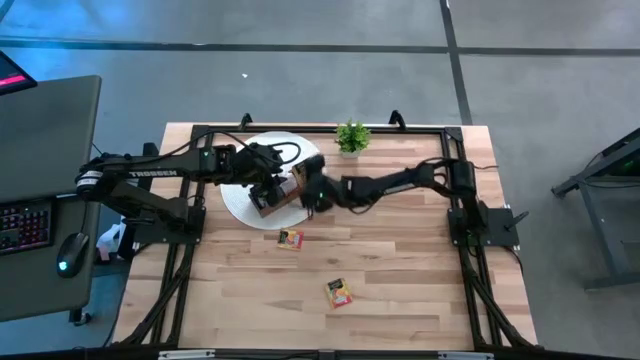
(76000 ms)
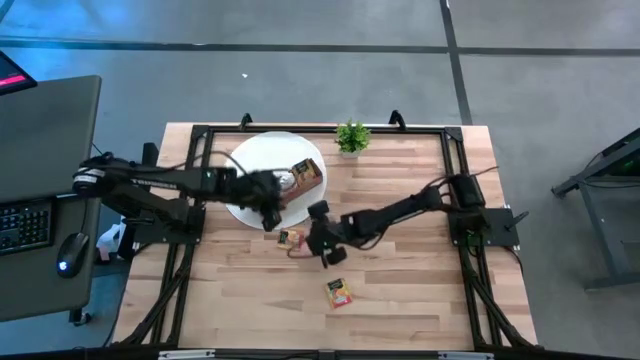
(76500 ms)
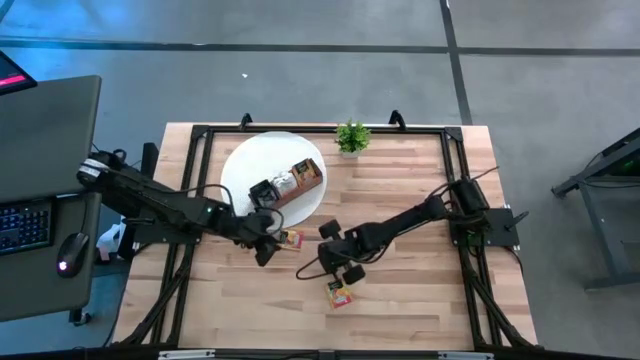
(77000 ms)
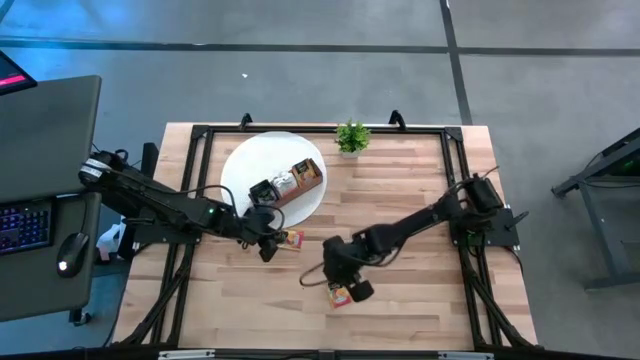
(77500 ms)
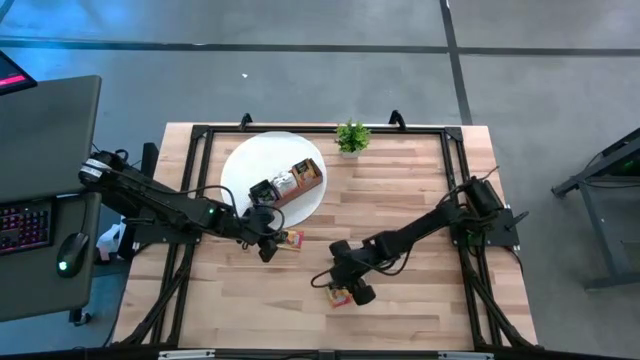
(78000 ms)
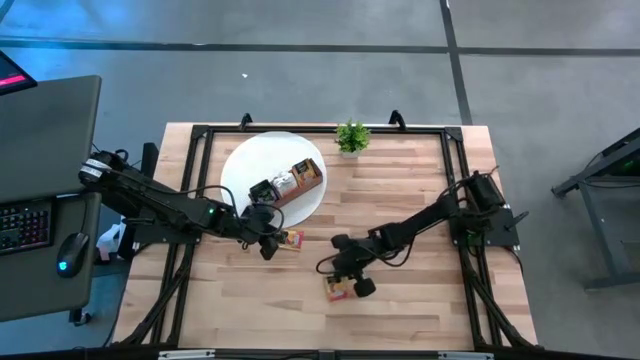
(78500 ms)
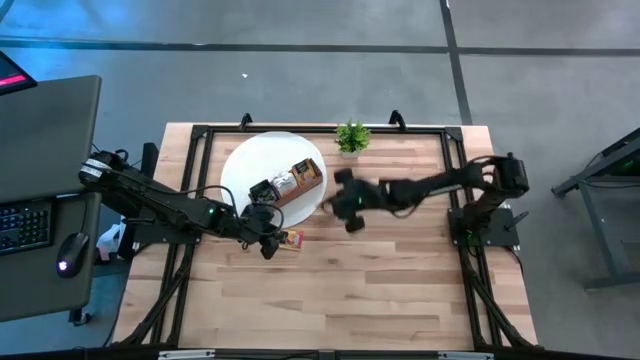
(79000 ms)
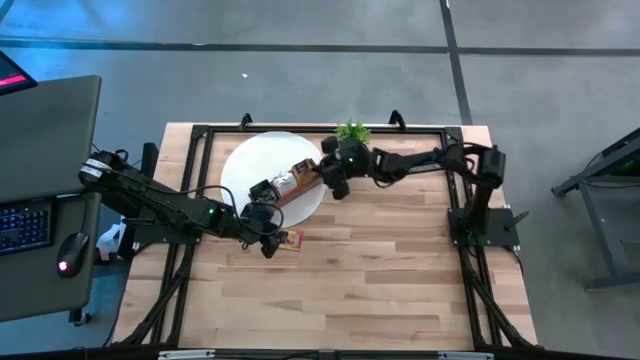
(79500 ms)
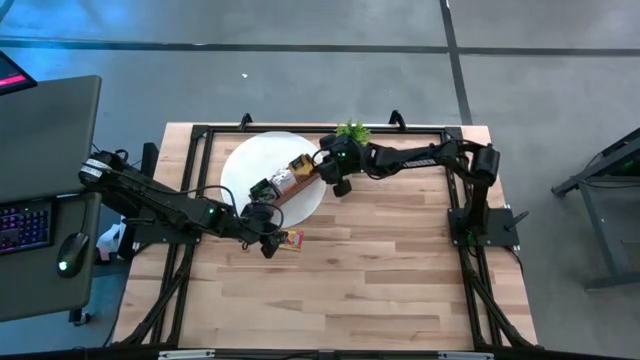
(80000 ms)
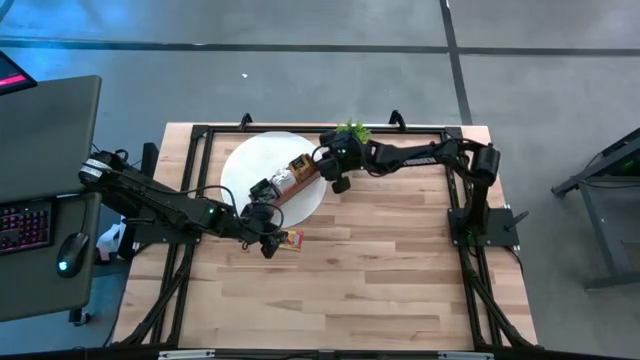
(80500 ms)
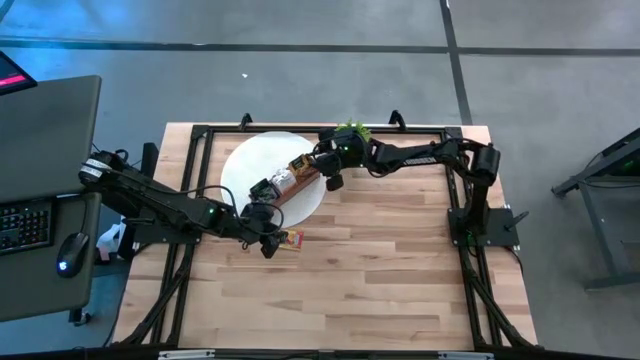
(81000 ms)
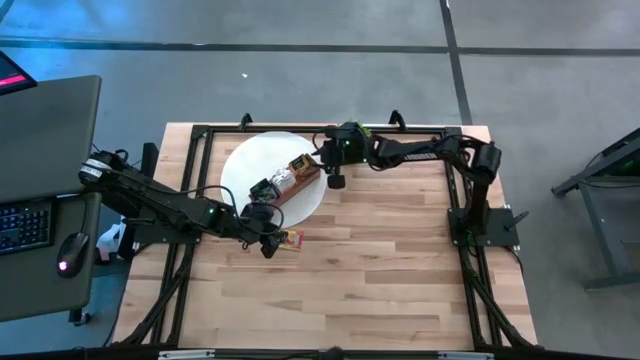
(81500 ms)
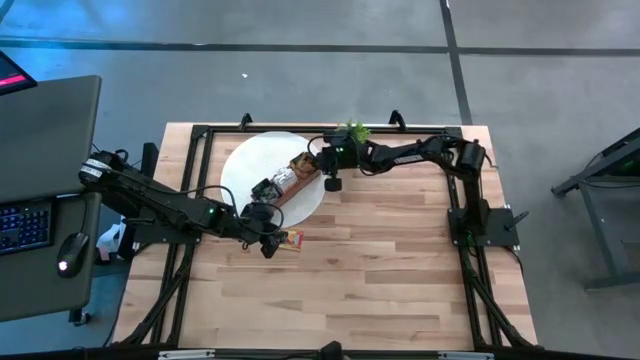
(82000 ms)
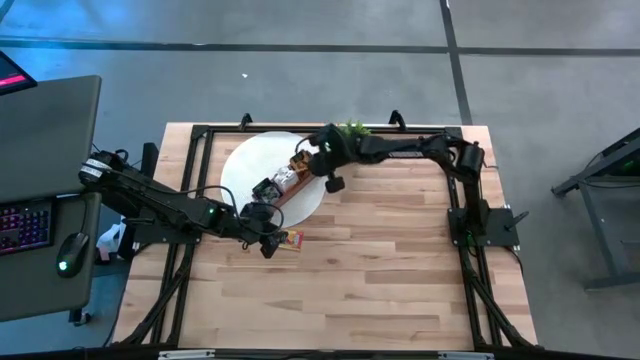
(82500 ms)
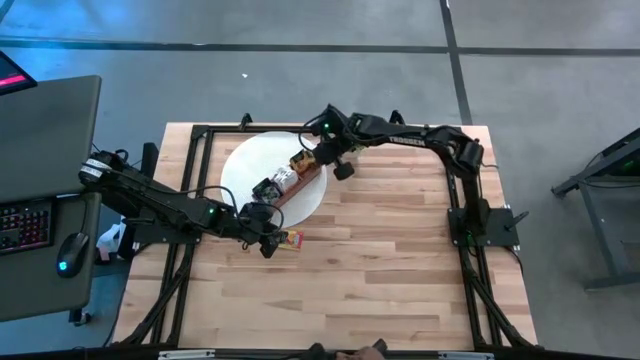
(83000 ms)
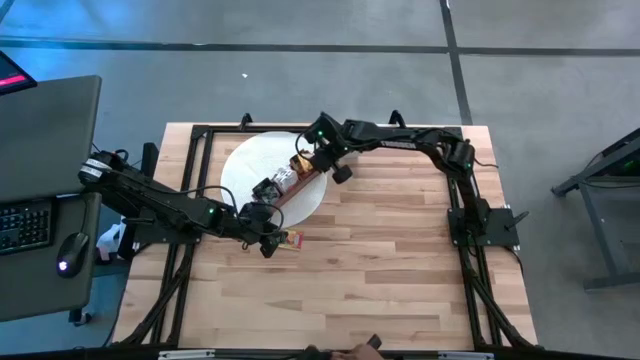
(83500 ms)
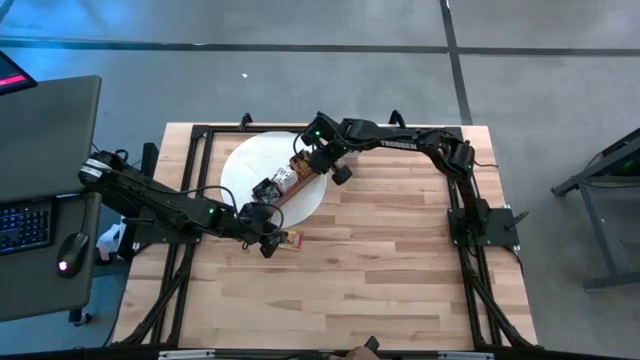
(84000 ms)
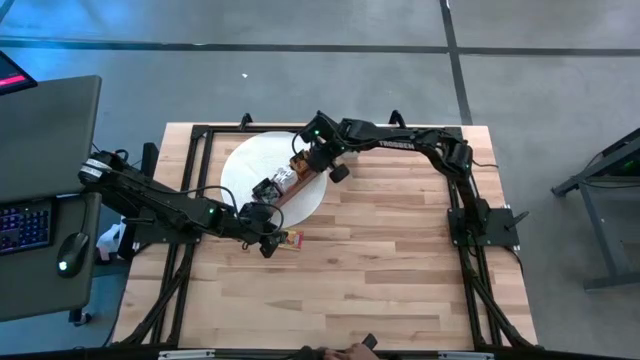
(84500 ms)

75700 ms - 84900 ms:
Task: Pick & Place Tea
Put the orange tea bag into the right section of the wooden organizer

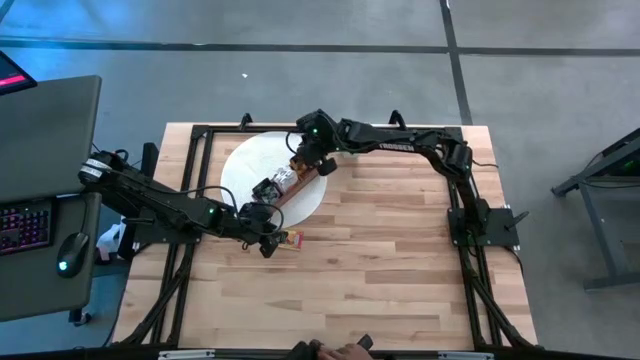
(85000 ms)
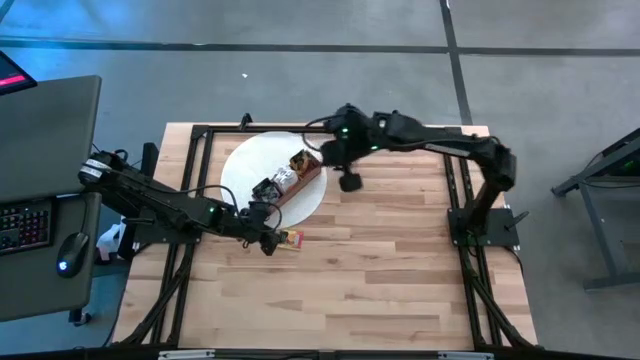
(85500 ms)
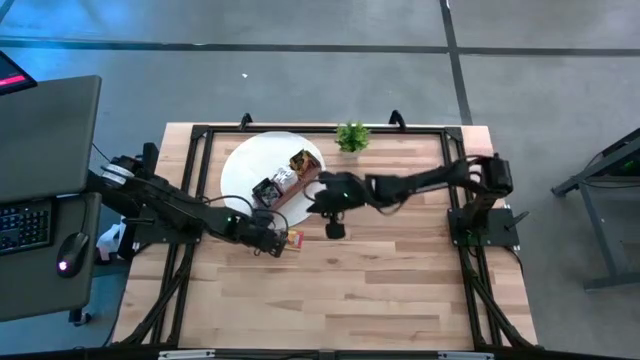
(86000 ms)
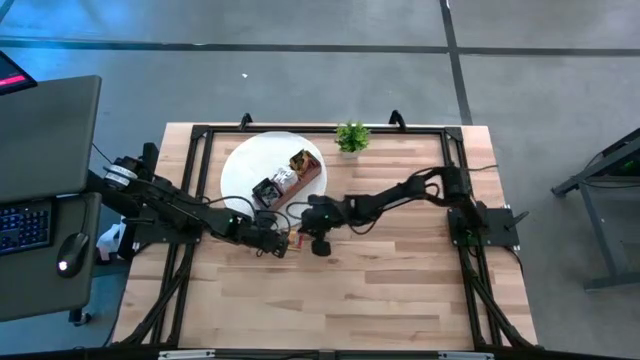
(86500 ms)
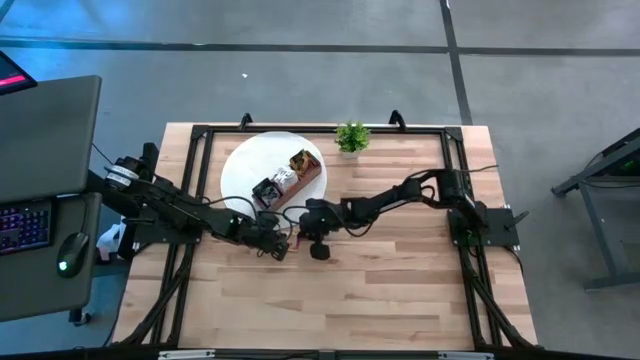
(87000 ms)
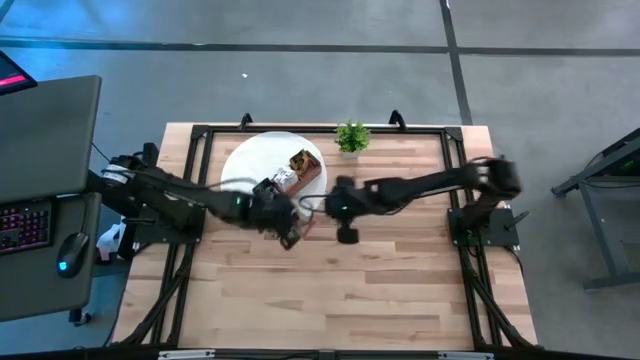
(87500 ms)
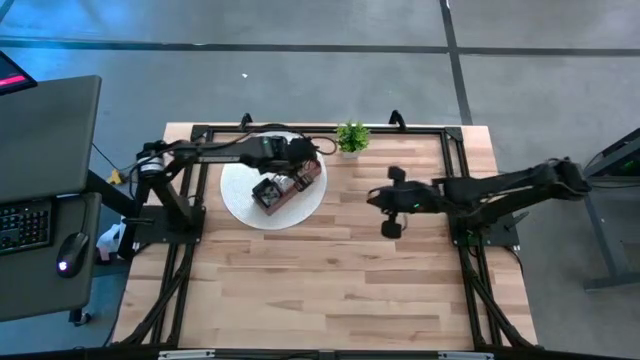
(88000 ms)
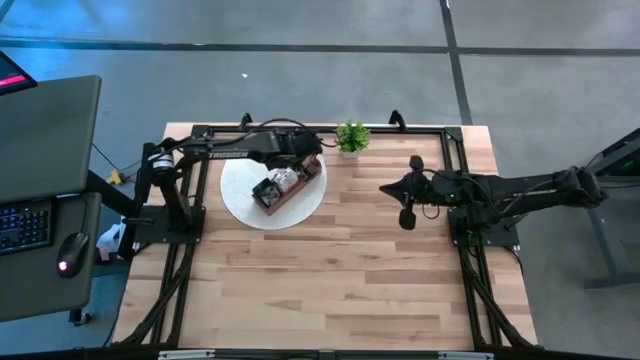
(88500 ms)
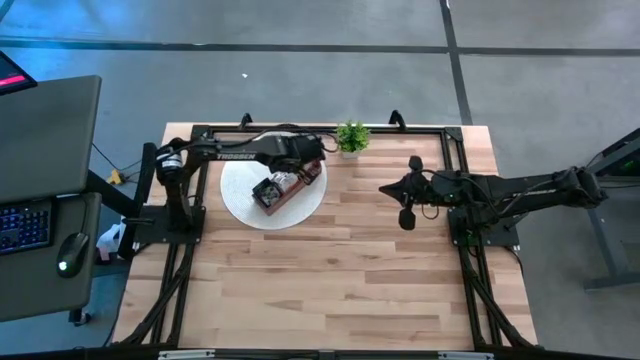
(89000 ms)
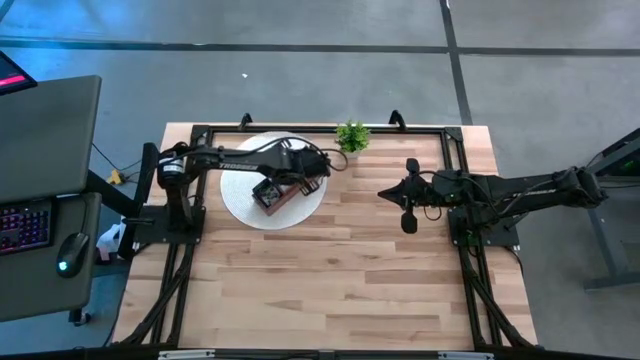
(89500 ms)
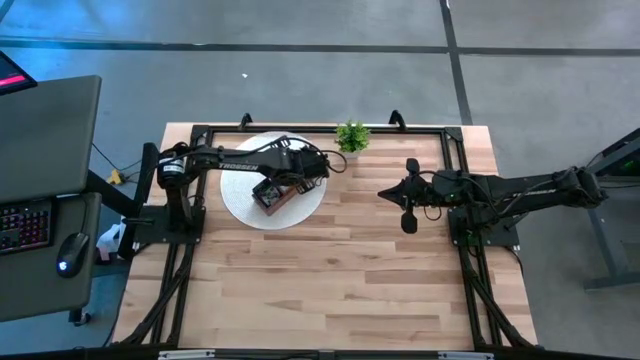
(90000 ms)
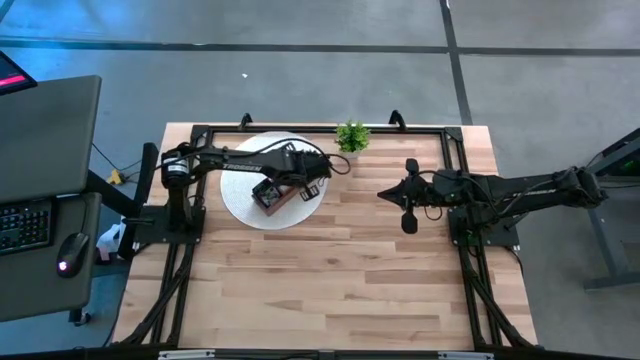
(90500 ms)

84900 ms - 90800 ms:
Put the orange tea bag into the right section of the wooden organizer

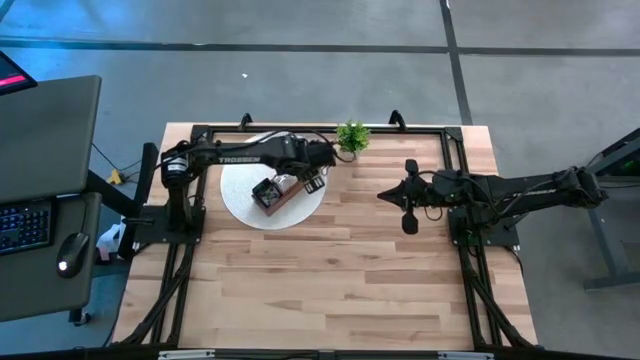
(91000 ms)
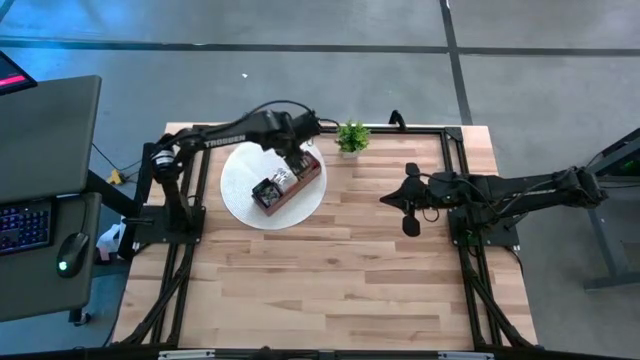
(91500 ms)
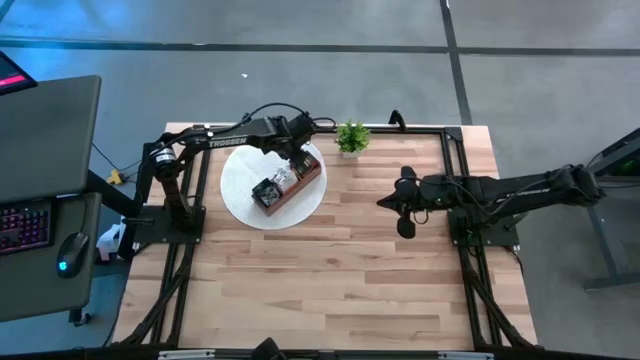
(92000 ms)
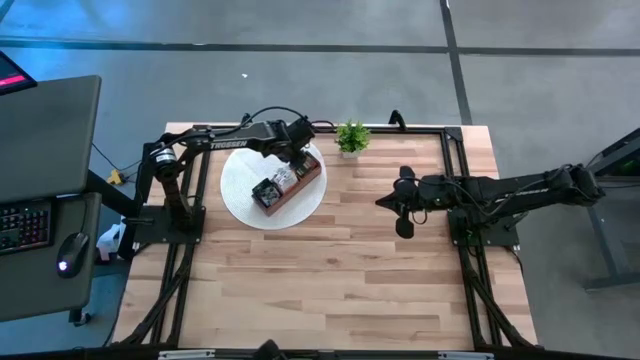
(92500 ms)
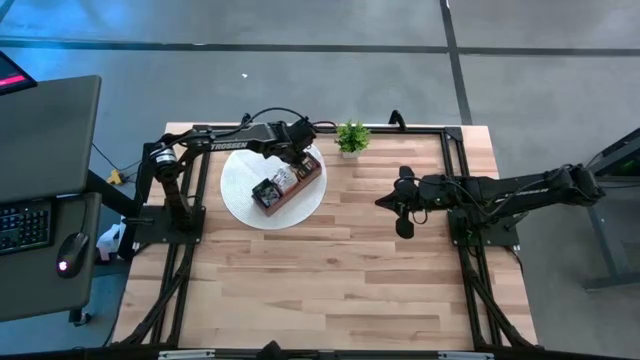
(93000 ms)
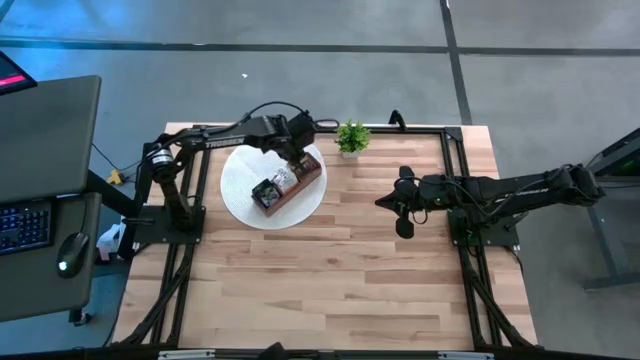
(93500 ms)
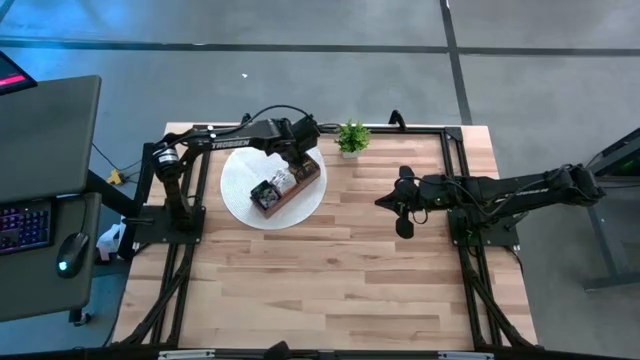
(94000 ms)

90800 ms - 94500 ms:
Adjust the orange tea bags in the right section of the wooden organizer

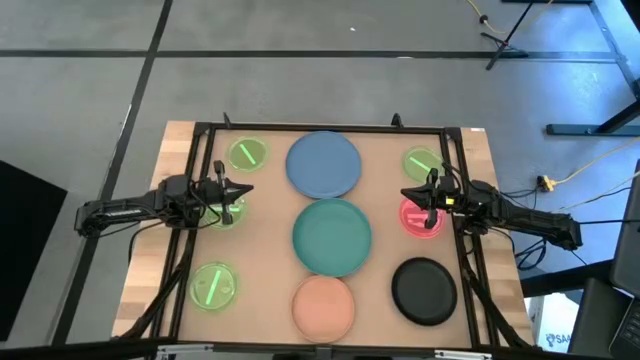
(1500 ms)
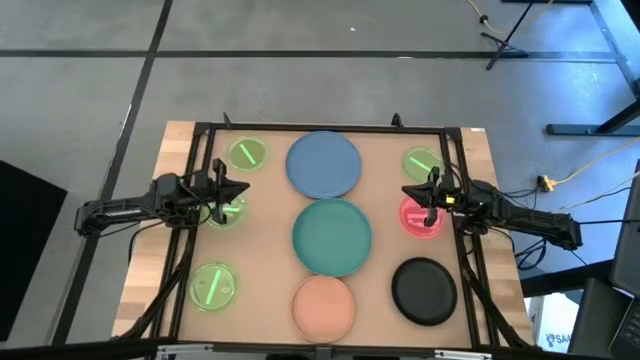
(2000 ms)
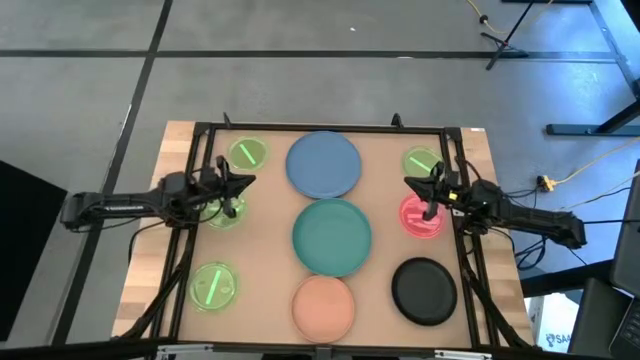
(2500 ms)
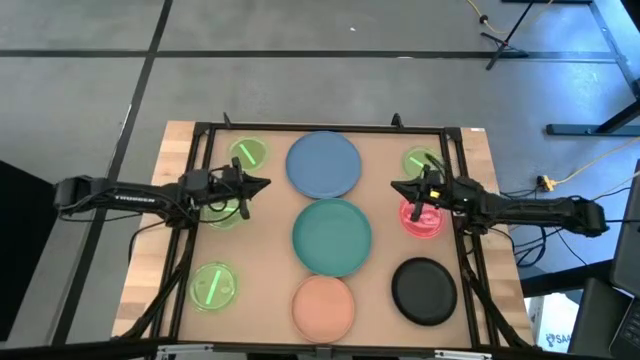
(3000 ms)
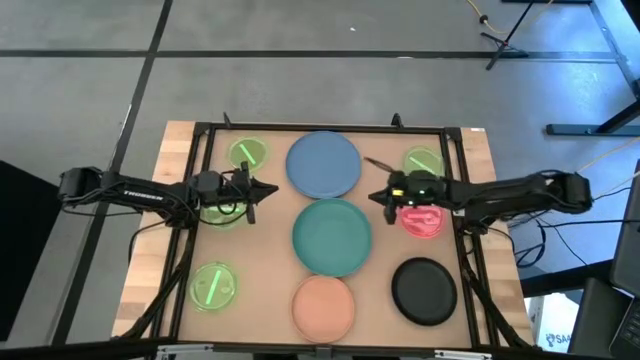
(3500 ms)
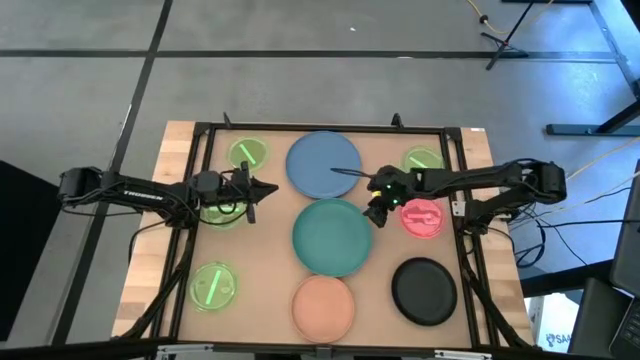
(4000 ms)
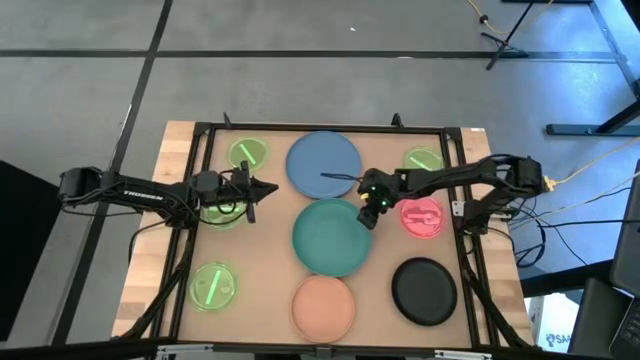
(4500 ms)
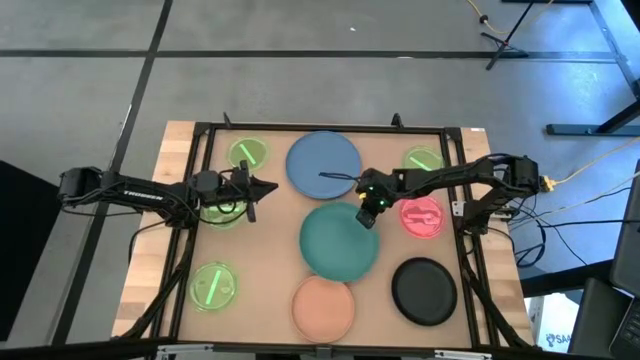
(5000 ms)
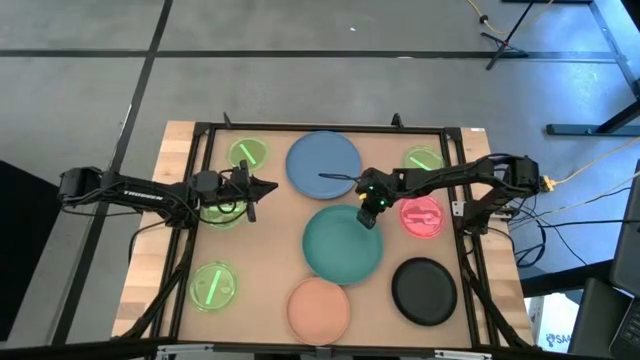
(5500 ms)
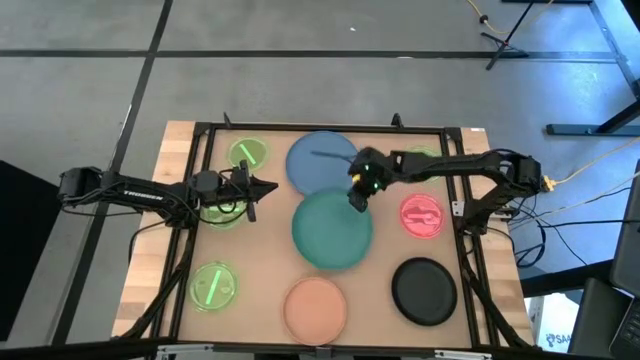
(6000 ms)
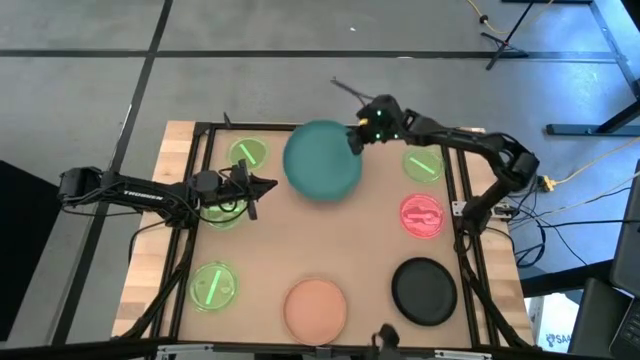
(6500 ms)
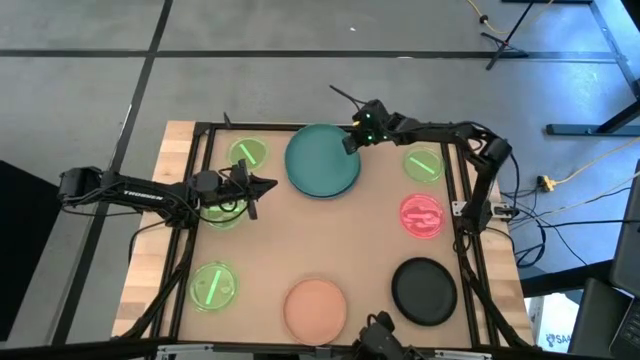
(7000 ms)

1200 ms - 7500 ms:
Task: Stack plastic plates
Stack the green plate on top of the blue plate
